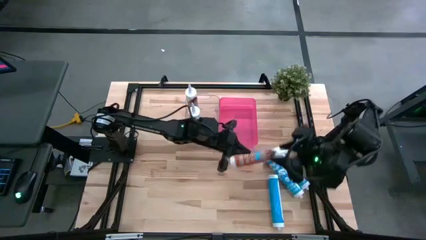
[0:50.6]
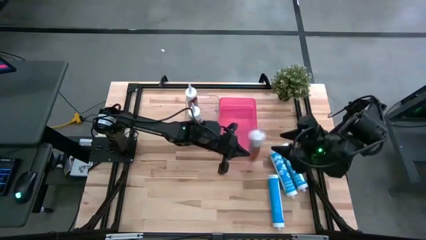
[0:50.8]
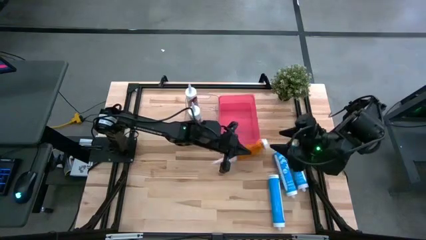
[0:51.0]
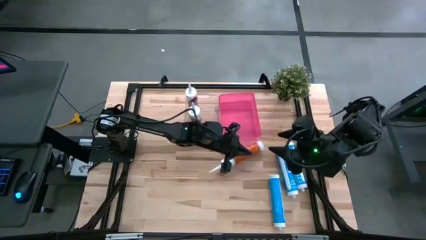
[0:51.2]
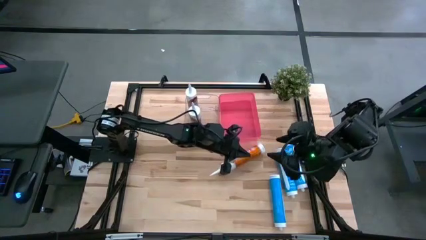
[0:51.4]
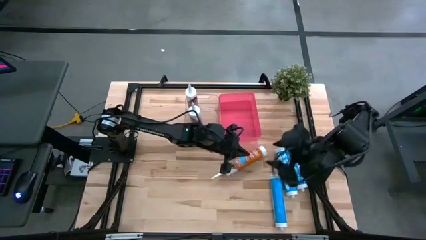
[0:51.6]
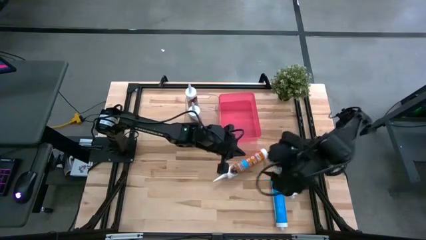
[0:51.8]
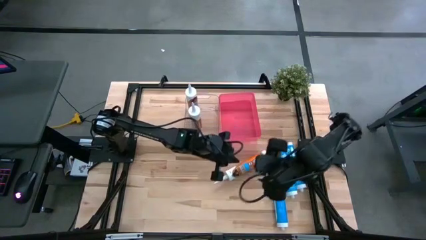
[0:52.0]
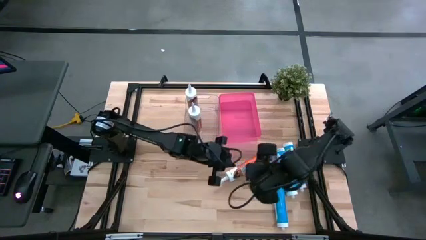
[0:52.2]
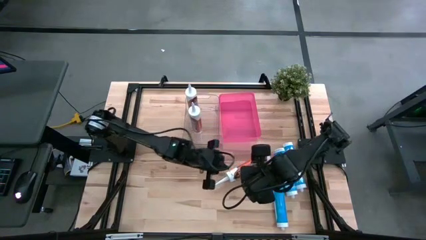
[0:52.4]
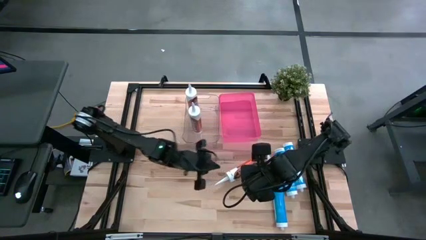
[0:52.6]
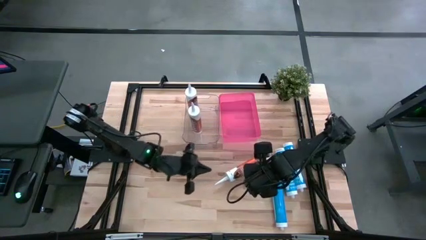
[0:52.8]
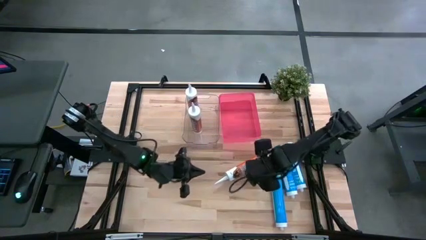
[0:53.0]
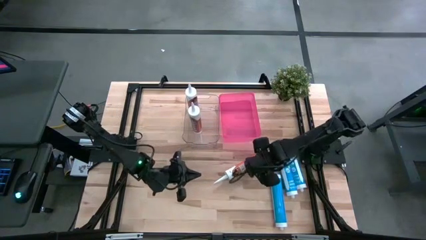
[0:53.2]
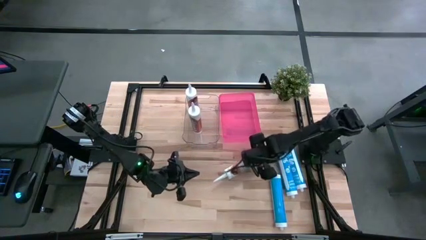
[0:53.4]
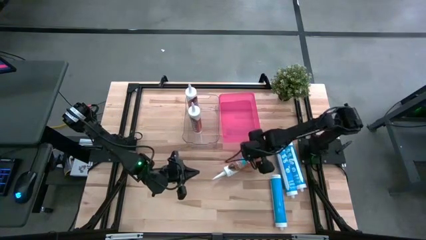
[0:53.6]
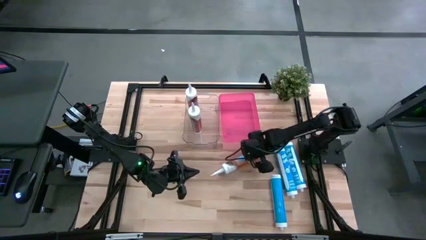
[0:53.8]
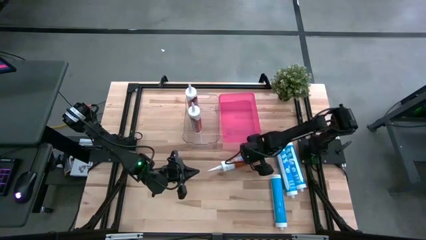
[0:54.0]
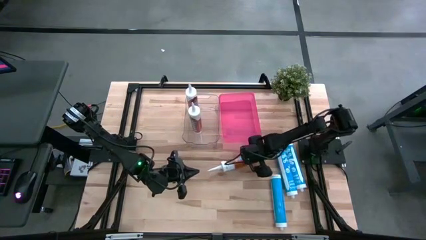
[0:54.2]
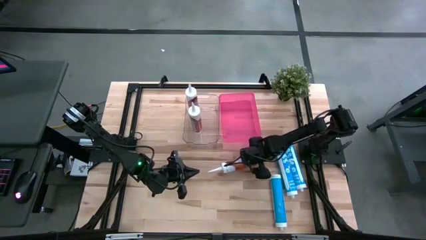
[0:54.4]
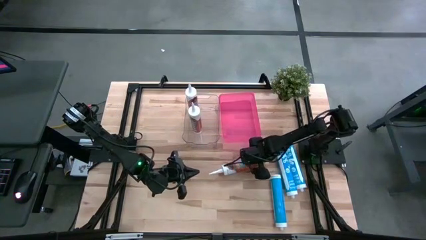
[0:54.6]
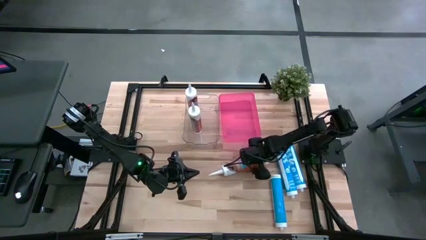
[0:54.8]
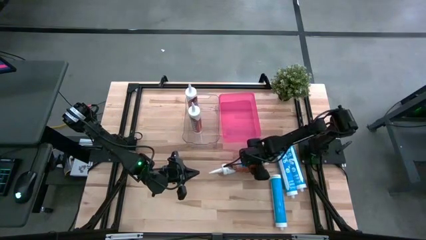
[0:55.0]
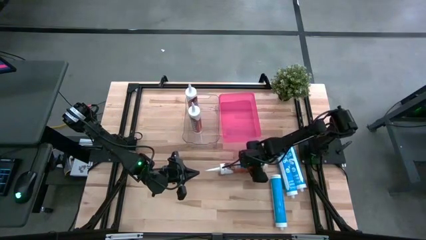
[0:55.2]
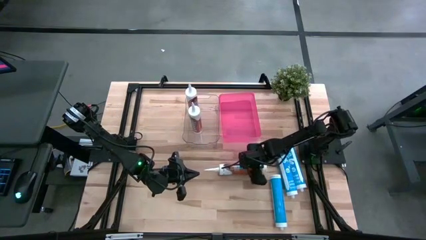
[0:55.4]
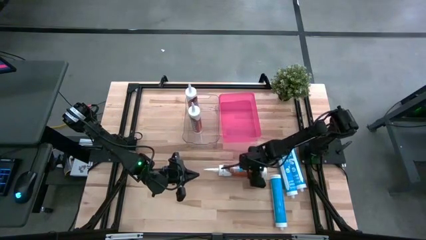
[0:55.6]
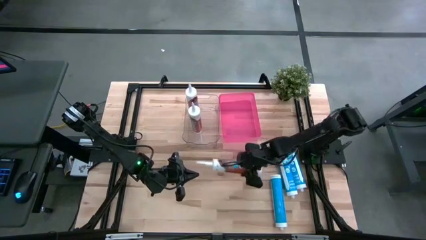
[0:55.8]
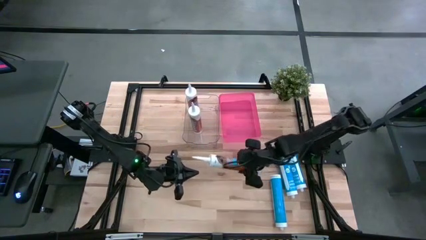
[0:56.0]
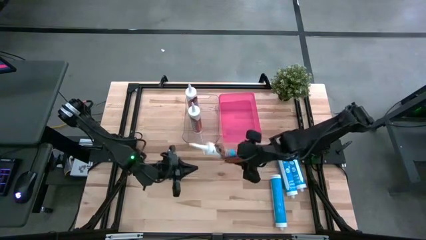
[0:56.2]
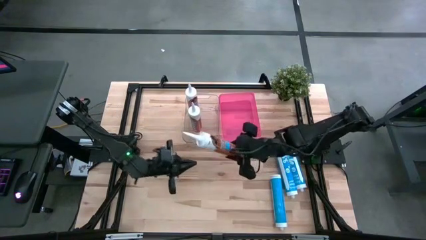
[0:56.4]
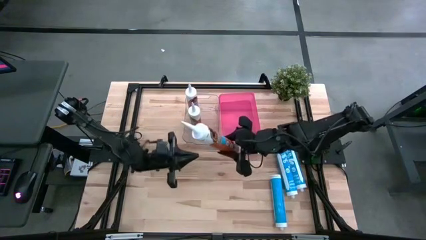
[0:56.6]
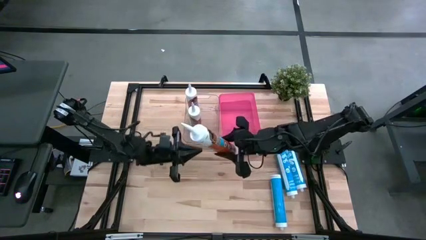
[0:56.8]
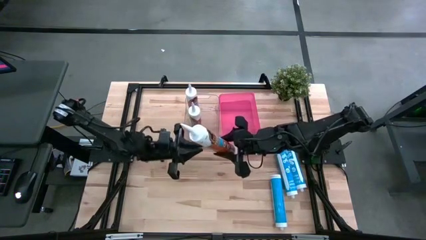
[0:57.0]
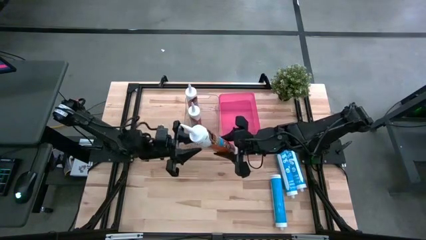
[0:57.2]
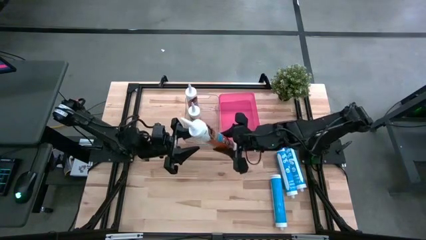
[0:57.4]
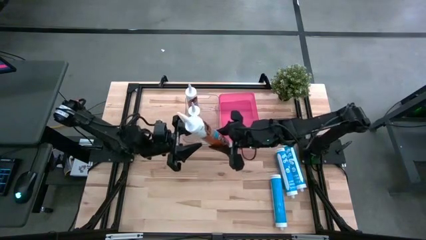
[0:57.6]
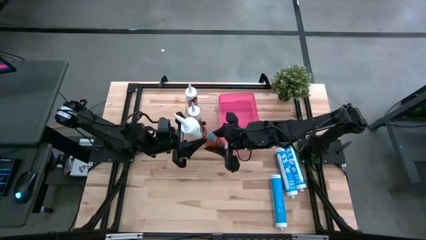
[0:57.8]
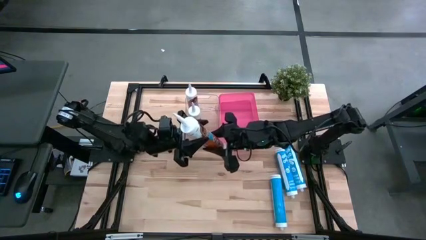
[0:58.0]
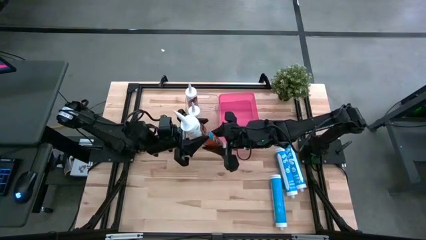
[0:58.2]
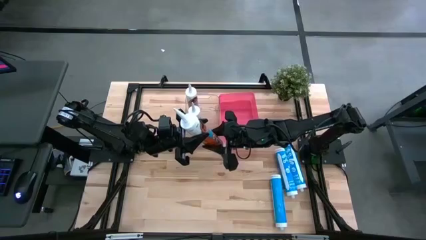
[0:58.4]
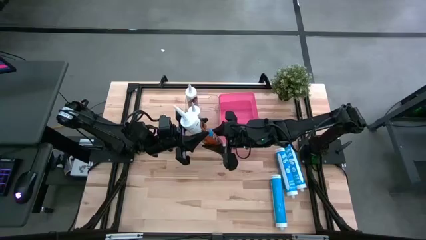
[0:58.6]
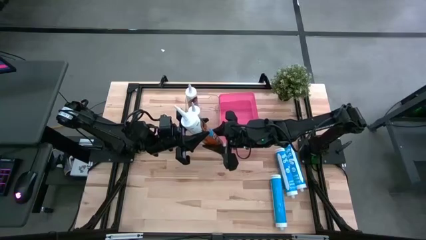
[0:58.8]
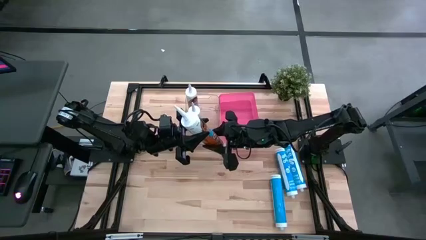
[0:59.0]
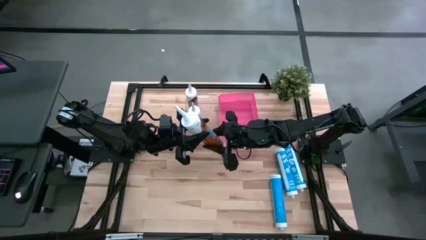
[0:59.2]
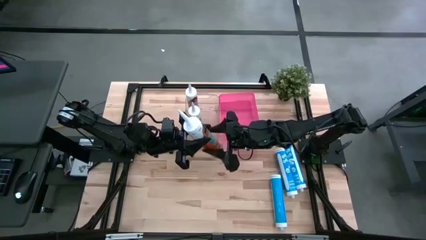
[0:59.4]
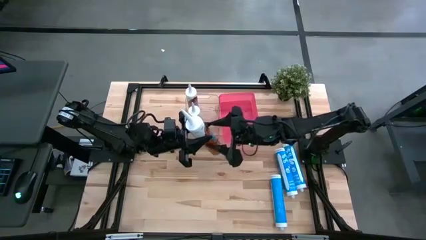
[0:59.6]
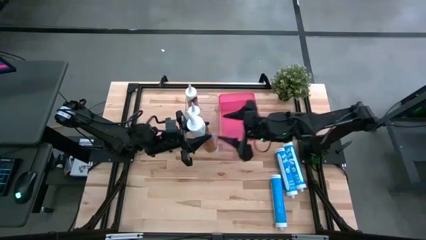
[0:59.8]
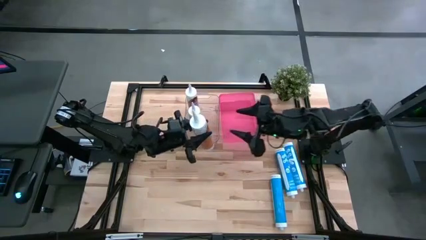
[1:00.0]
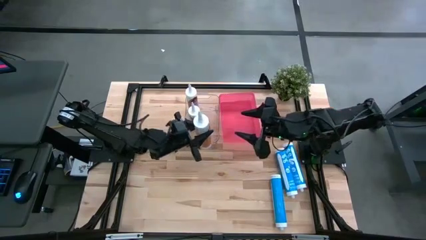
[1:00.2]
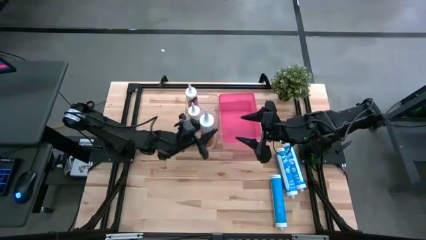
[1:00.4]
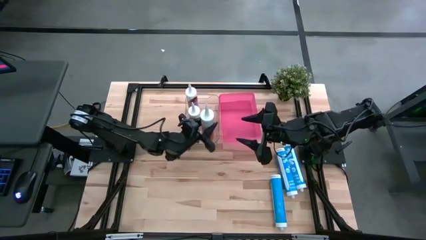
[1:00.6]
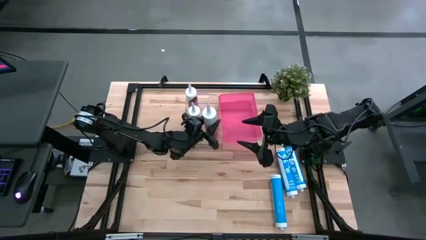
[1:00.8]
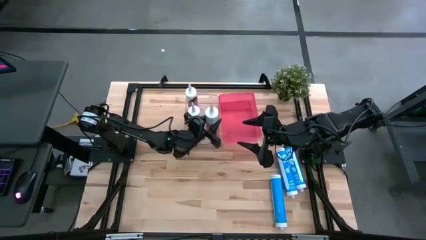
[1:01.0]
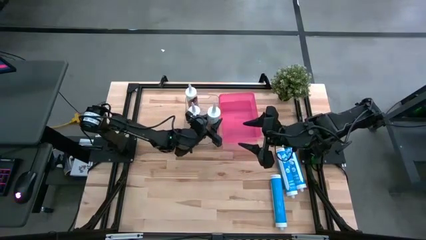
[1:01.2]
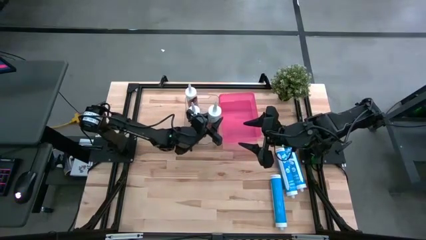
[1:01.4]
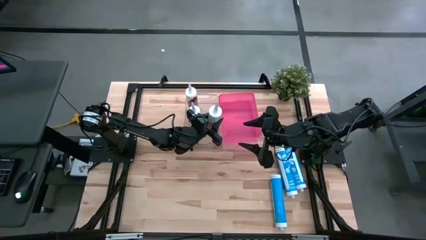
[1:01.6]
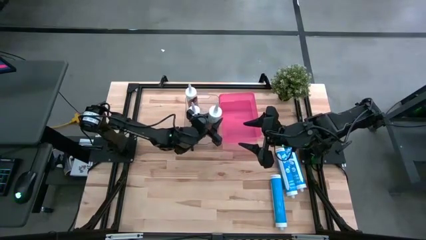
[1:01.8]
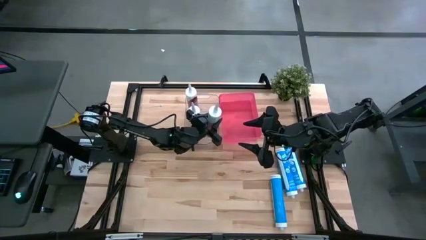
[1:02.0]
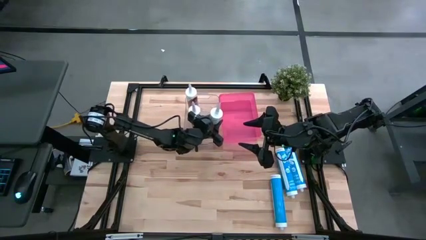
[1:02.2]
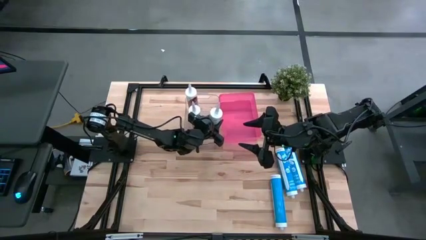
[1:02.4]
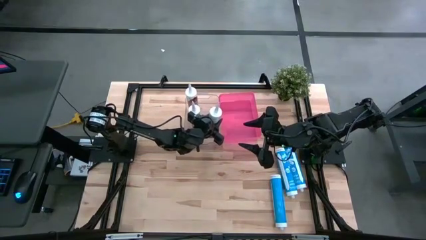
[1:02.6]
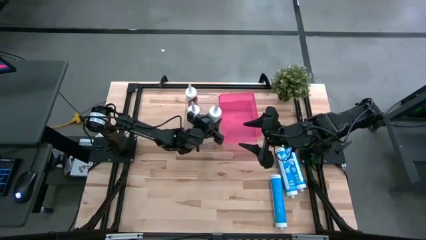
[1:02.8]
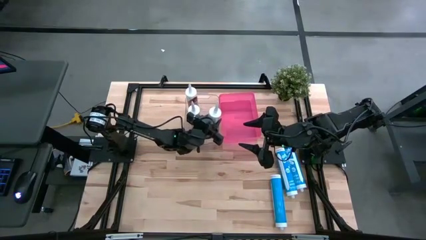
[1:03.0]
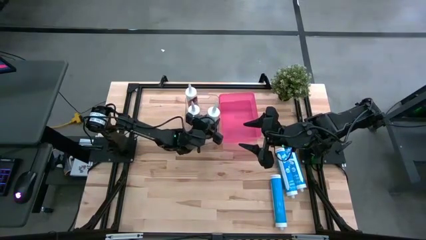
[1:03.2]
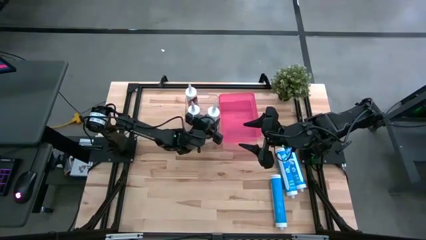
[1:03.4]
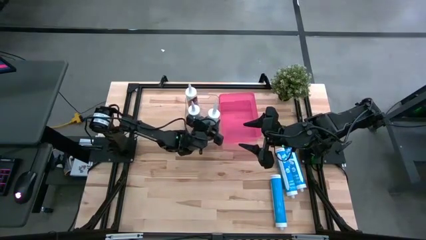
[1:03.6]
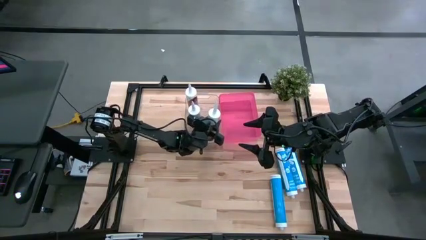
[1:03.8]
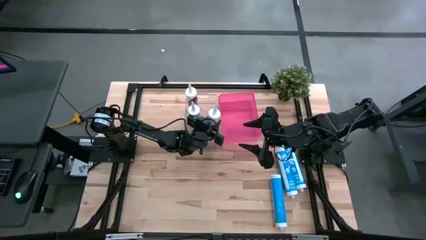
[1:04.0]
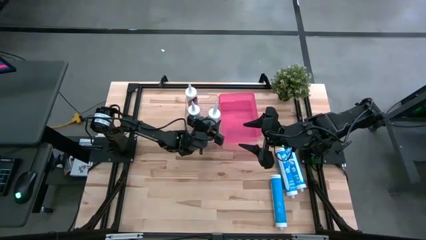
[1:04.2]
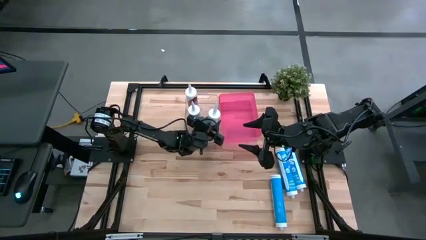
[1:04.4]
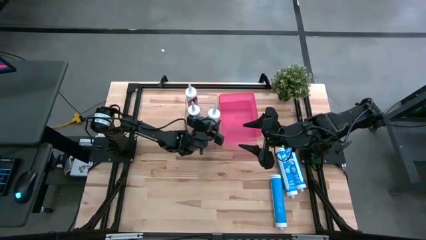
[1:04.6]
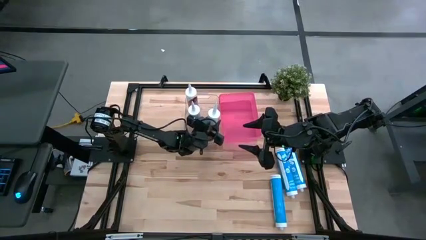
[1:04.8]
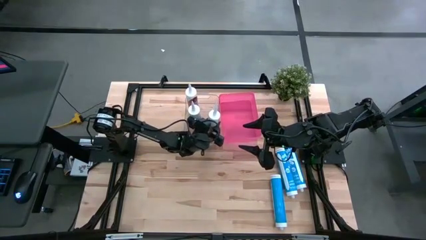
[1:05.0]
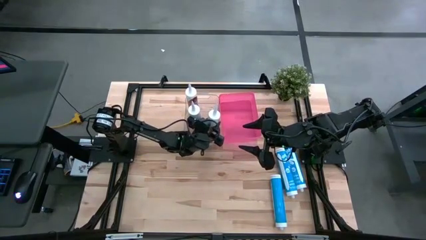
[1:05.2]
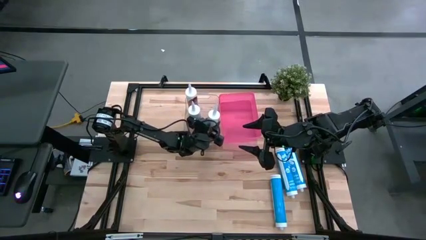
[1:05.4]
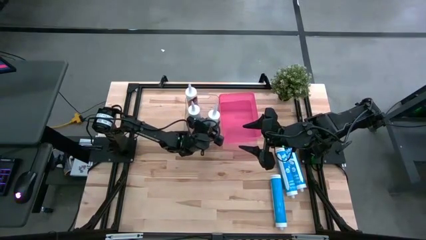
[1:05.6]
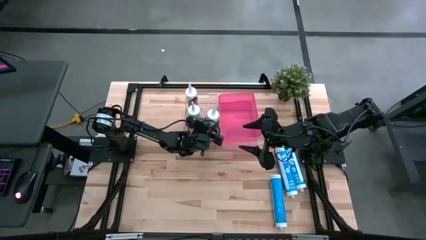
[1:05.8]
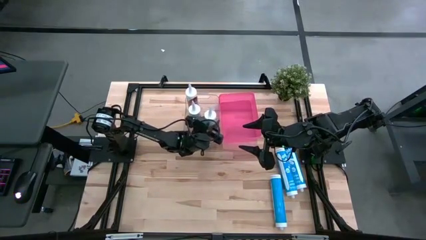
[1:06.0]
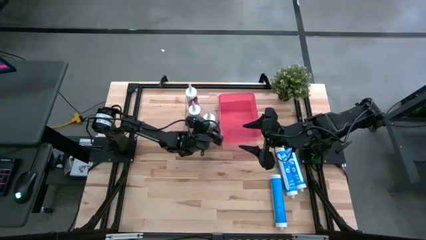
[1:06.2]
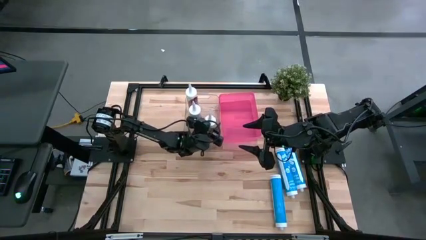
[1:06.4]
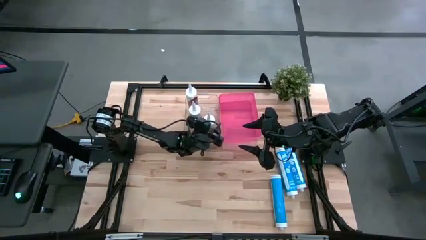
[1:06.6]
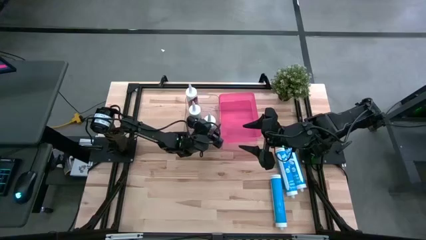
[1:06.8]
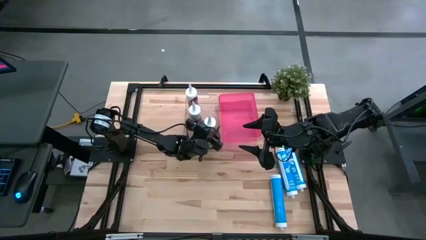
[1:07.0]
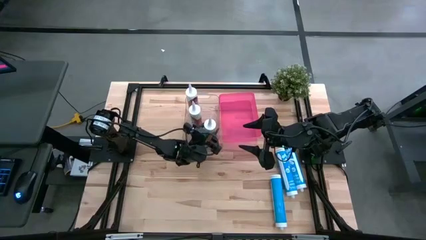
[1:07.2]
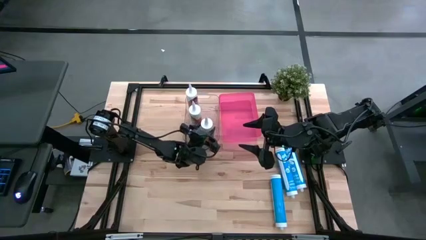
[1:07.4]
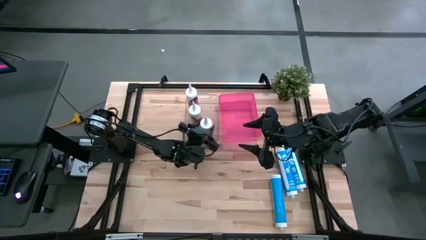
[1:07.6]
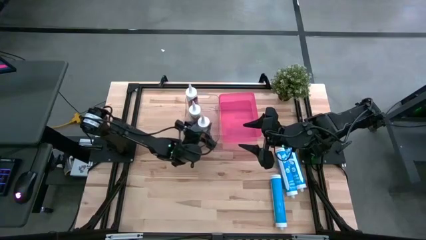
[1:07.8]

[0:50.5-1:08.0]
Task: Pick & place silicon tubes, Sealant and Lysol wipes
Put the orange sealant into the transparent bin
